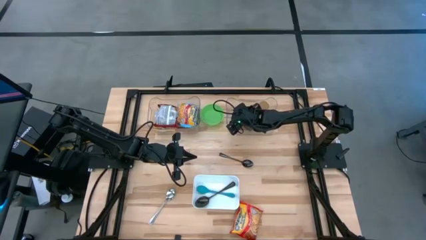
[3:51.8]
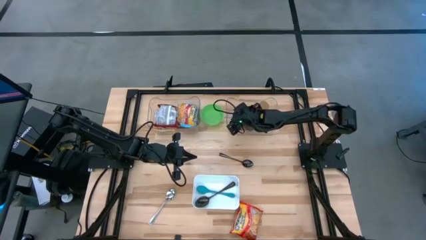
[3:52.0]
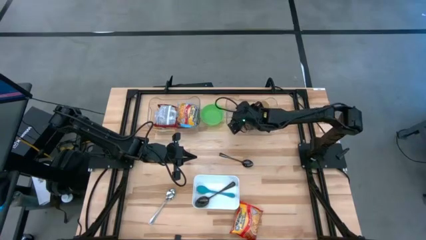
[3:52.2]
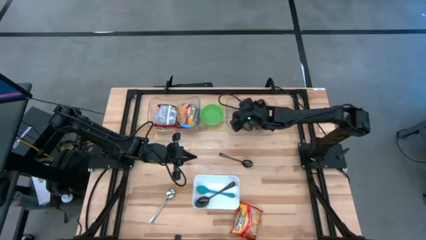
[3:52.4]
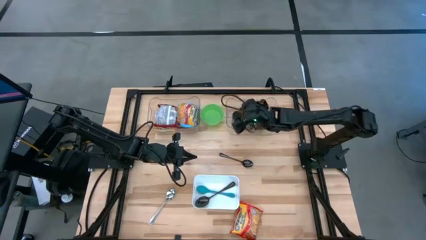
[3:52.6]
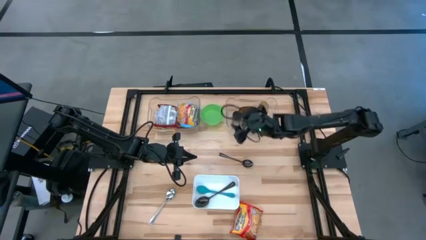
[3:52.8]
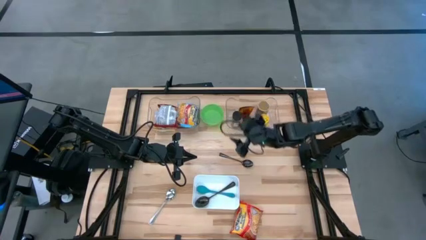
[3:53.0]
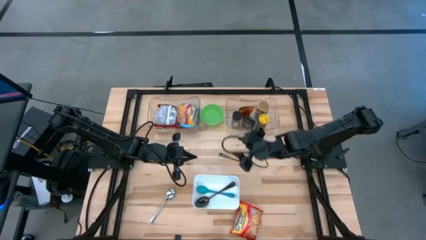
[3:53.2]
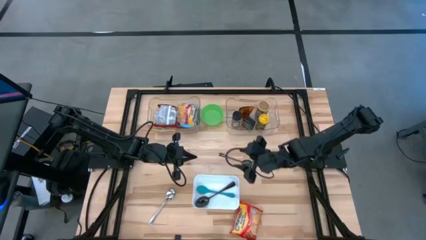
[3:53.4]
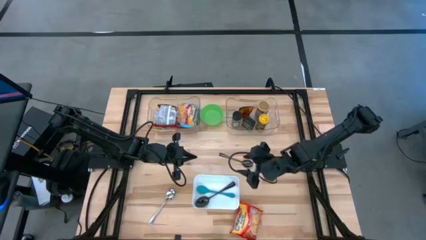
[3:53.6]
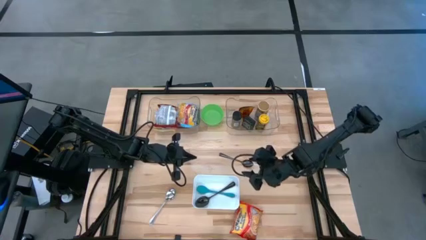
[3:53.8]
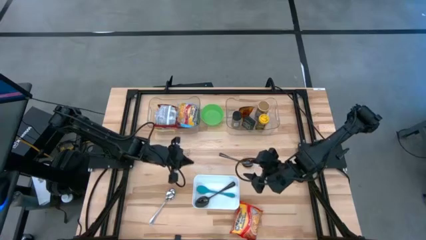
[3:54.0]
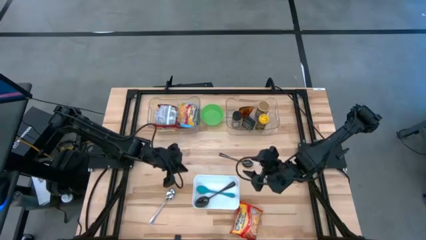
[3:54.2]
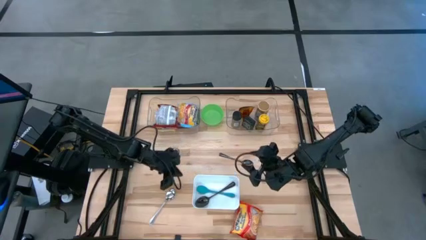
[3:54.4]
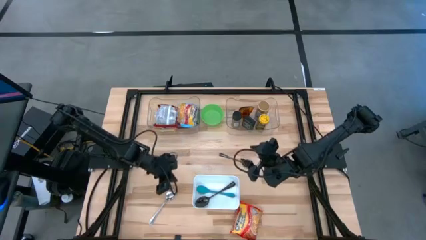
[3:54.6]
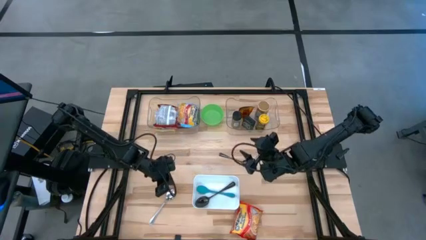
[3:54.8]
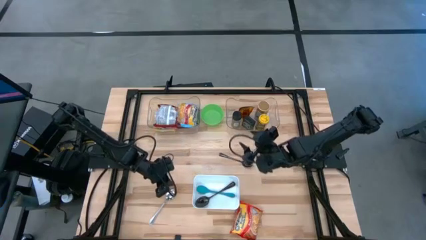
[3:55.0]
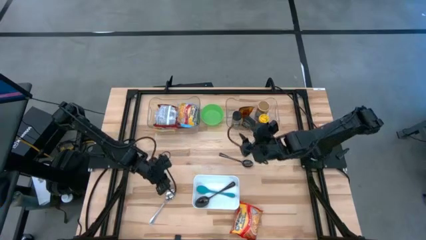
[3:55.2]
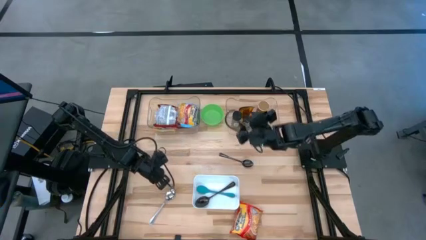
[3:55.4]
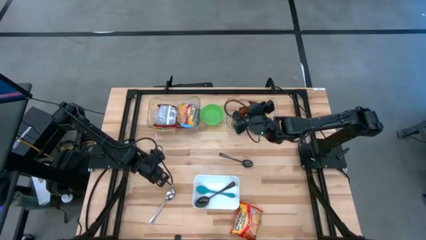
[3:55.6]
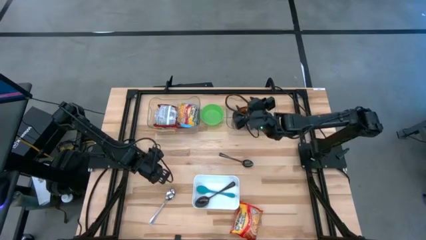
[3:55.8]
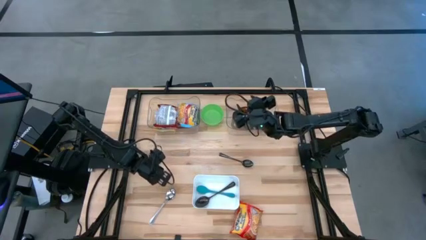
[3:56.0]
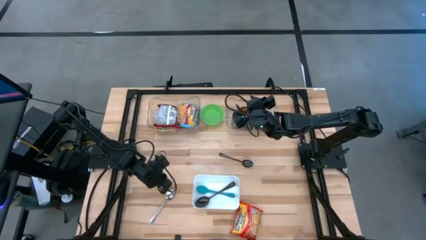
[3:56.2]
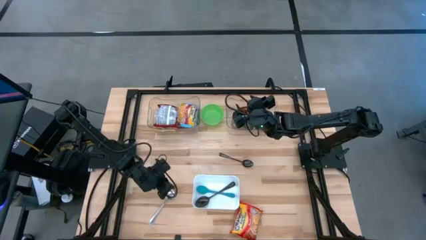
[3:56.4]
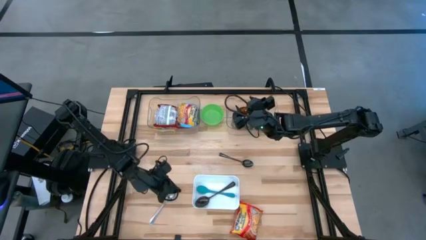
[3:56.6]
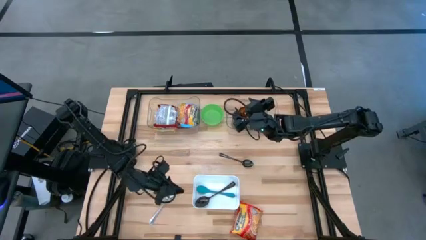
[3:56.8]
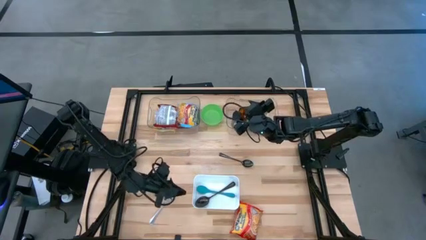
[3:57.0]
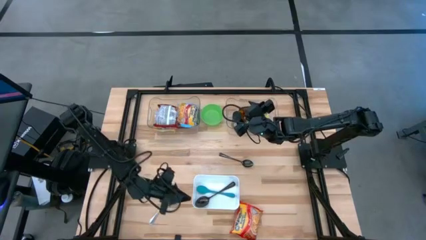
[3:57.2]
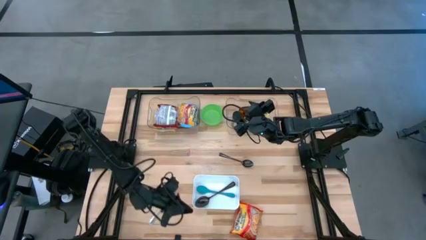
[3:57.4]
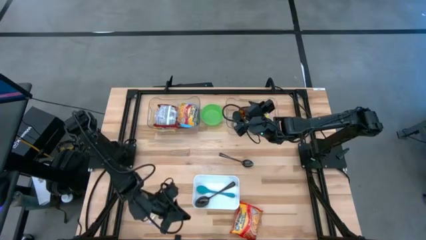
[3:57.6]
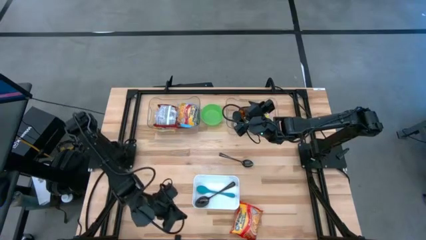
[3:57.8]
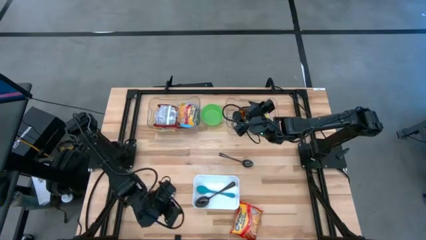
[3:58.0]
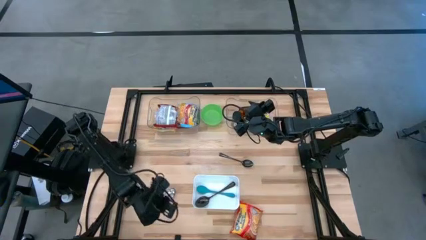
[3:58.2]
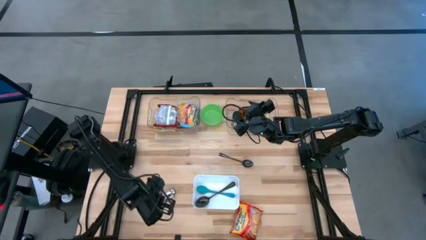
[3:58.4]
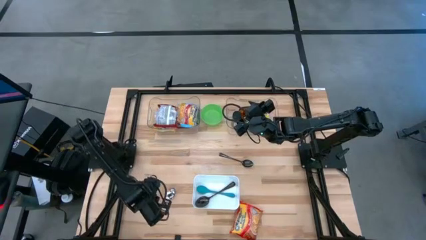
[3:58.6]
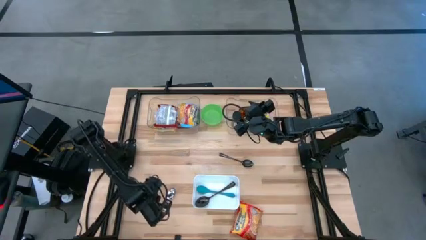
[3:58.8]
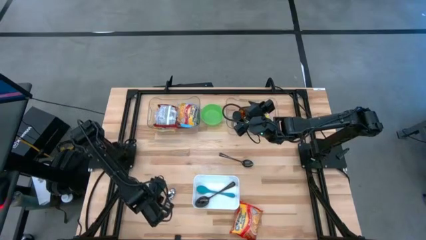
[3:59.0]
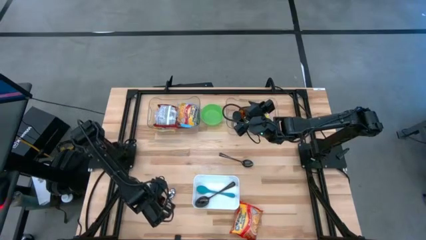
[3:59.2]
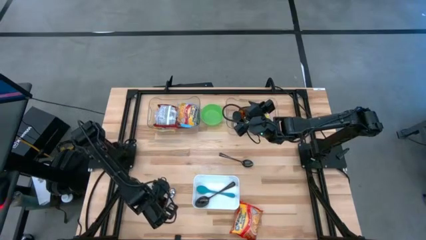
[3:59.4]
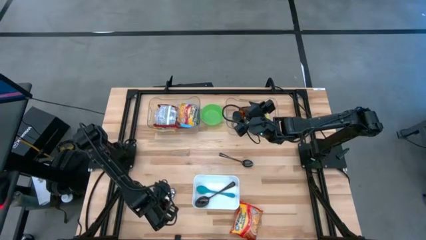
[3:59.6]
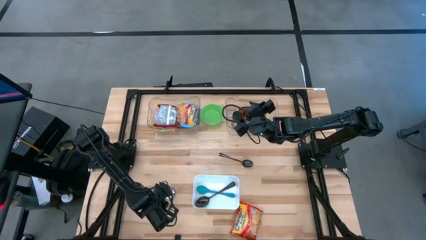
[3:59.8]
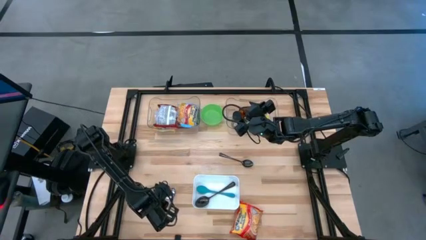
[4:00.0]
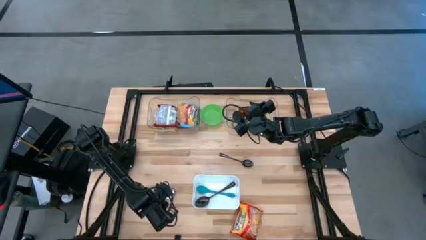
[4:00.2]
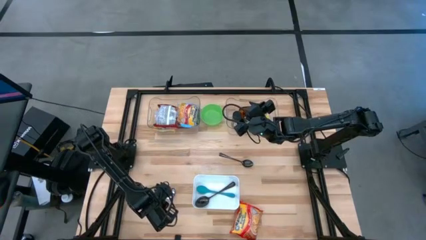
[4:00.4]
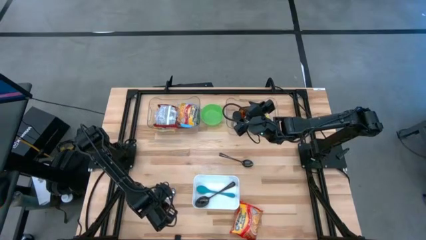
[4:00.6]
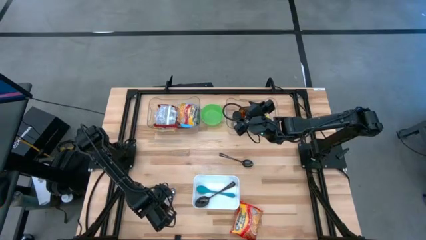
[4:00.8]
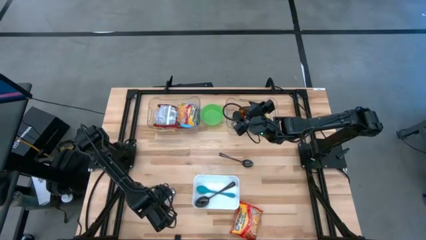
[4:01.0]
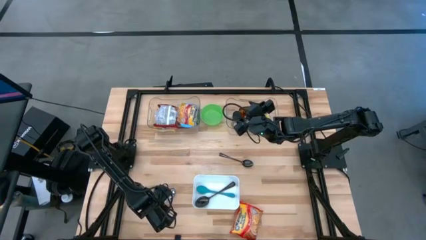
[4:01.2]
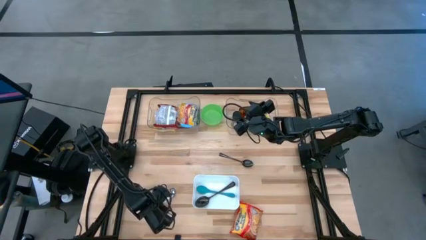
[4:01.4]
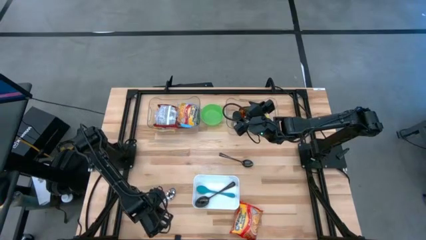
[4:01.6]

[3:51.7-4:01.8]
Task: Pick & Place Food Item
Put the silver spoon into the white bin

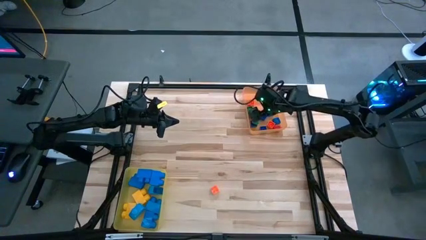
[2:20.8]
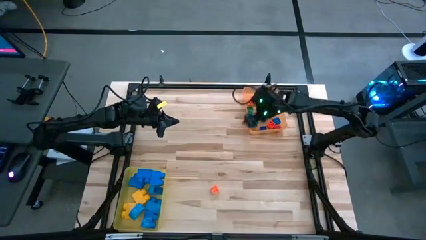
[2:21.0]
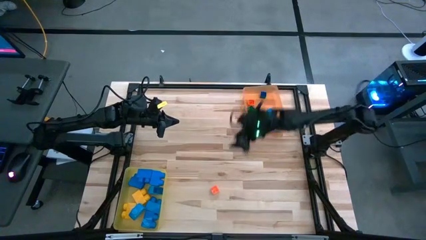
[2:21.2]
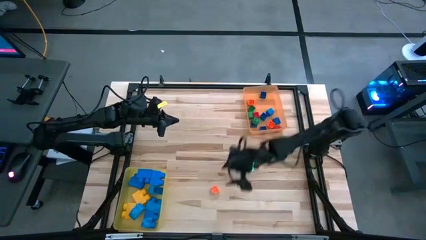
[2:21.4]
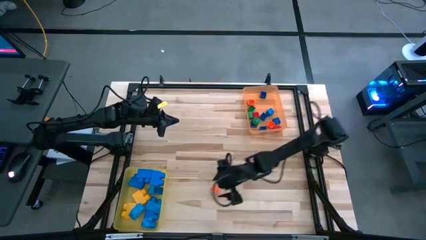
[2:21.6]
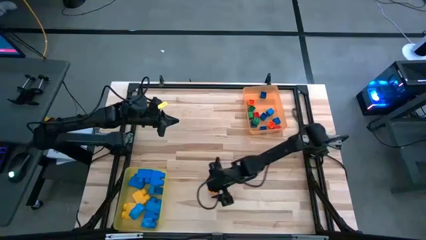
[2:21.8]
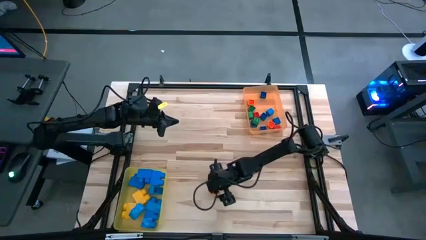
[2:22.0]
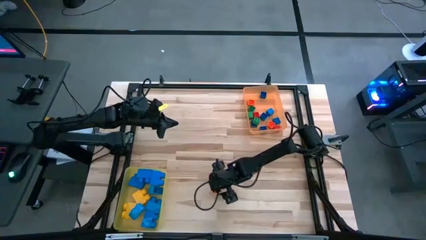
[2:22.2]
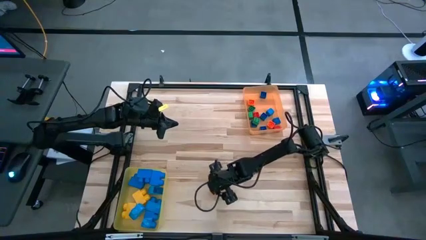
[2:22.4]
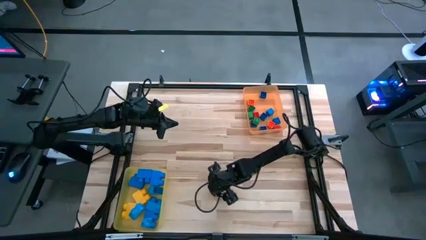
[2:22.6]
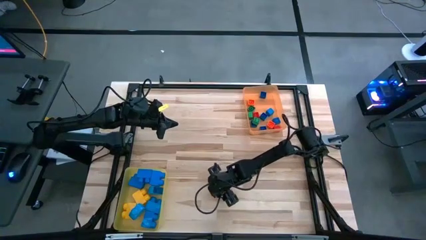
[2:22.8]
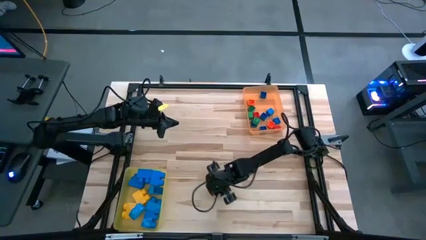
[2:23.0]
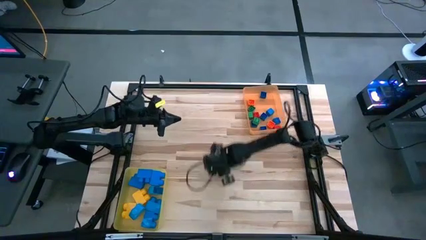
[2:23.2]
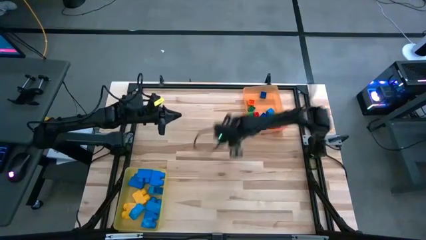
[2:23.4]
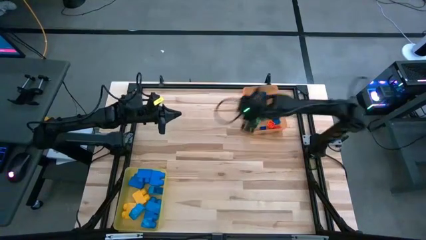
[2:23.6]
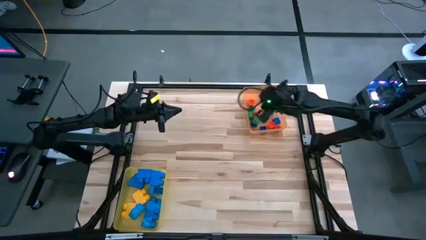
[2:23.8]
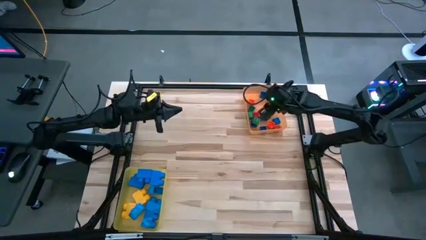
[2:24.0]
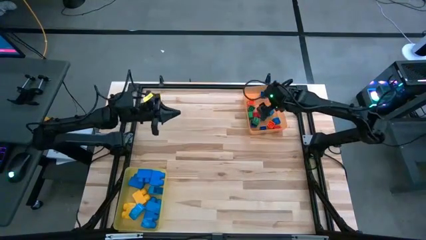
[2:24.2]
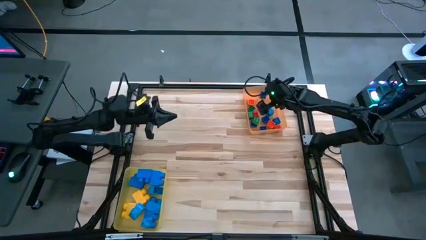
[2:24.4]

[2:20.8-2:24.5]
Task: Sort blocks by size
Put the small orange game piece into the orange bin
